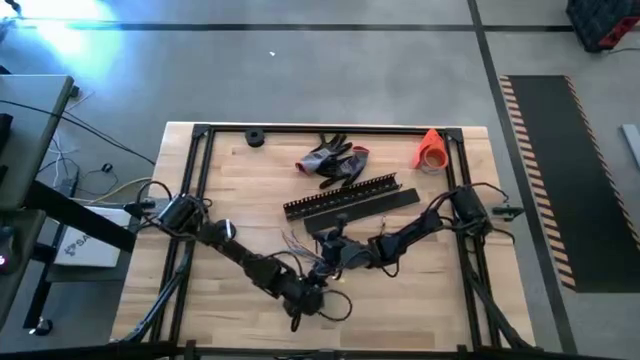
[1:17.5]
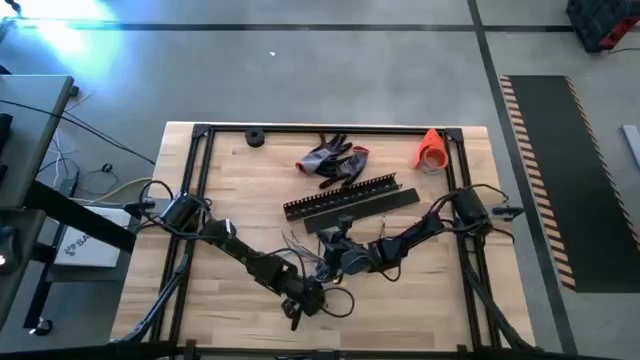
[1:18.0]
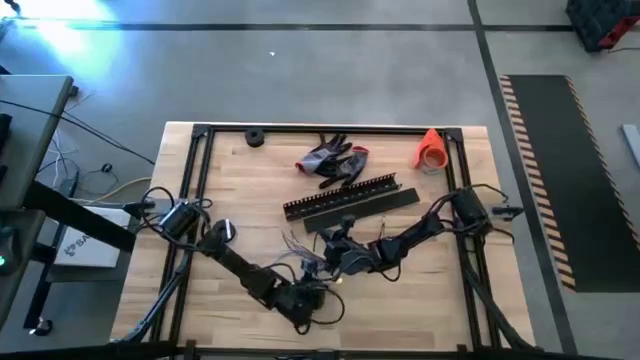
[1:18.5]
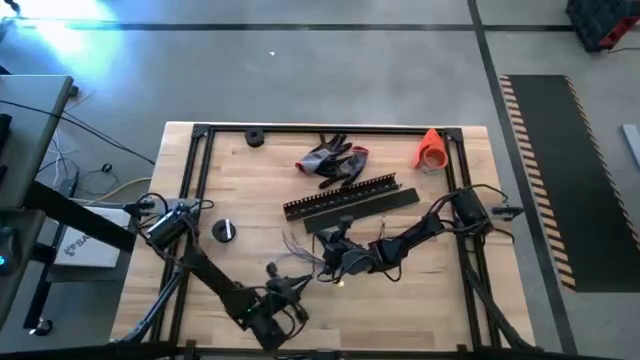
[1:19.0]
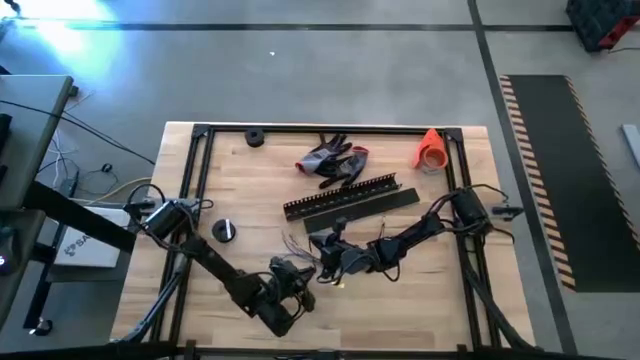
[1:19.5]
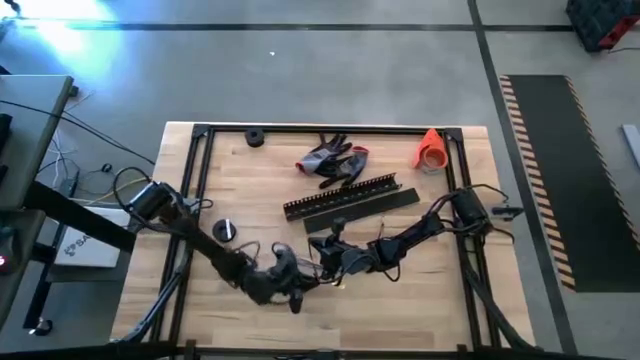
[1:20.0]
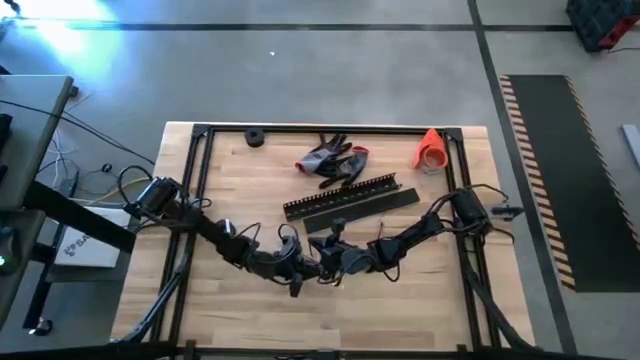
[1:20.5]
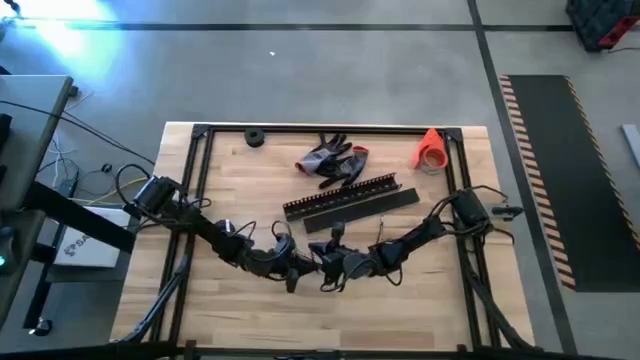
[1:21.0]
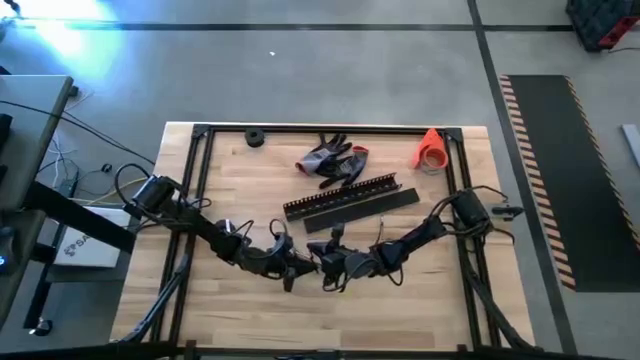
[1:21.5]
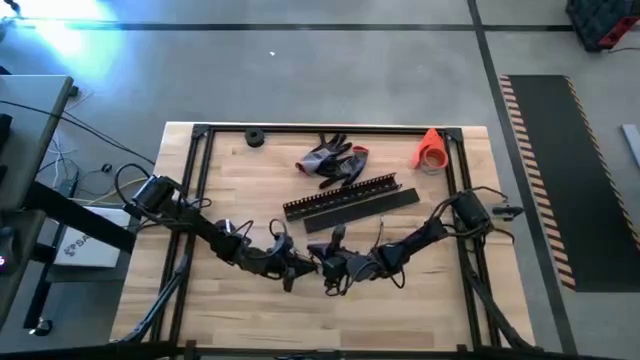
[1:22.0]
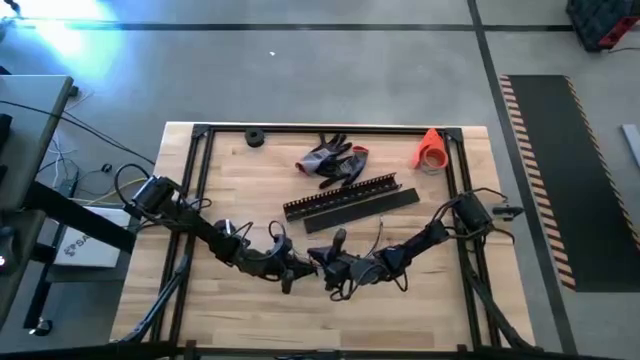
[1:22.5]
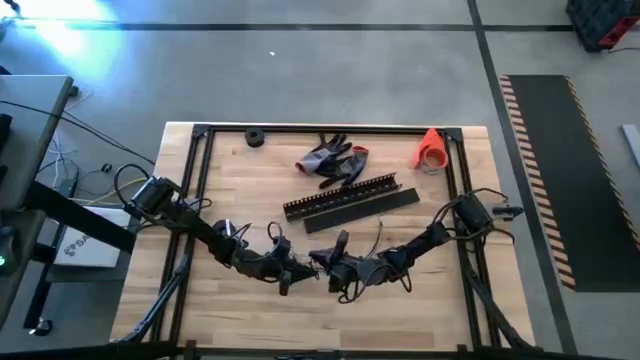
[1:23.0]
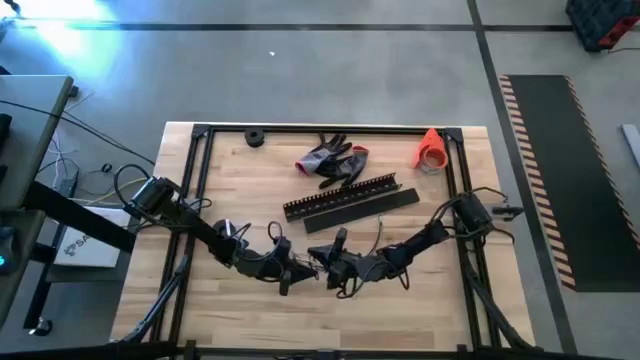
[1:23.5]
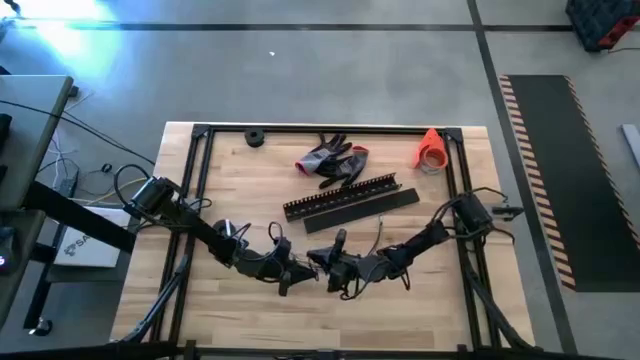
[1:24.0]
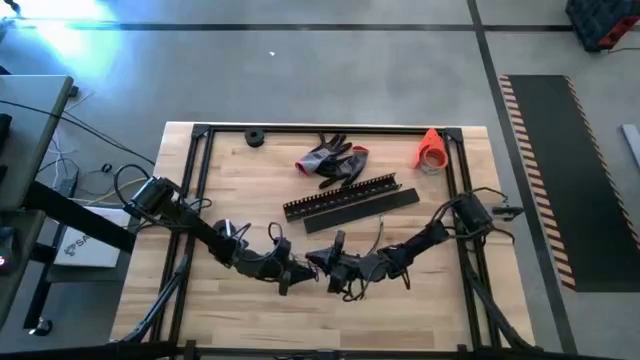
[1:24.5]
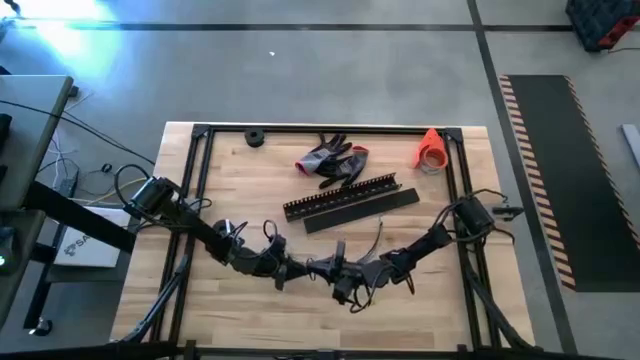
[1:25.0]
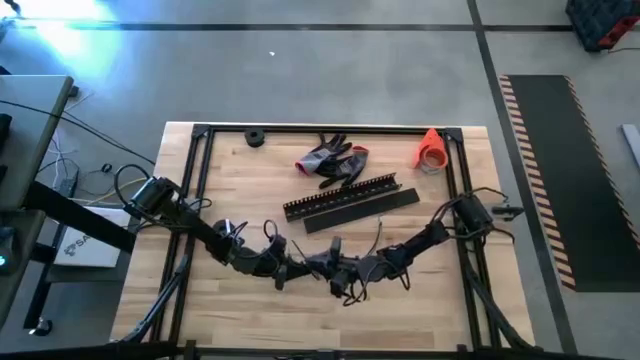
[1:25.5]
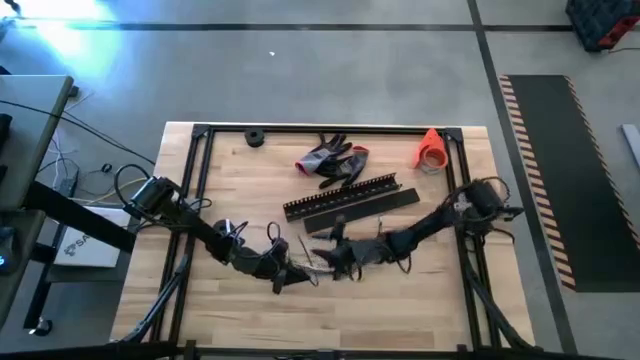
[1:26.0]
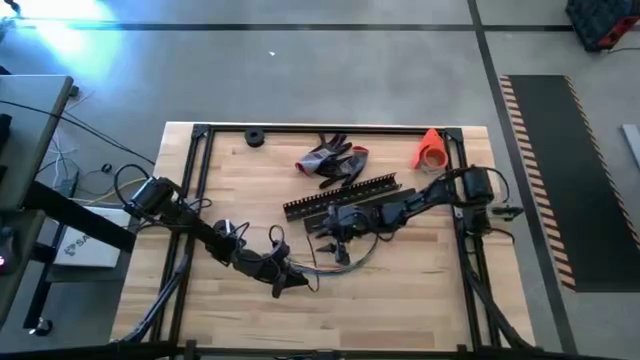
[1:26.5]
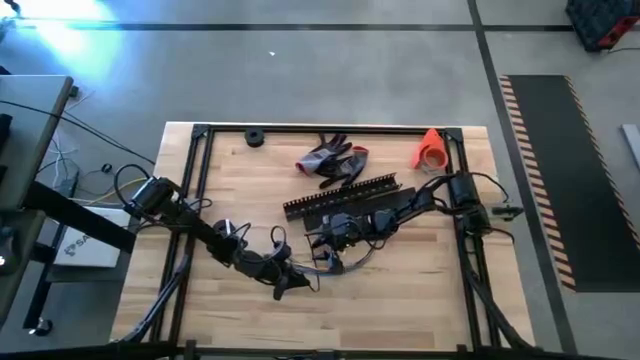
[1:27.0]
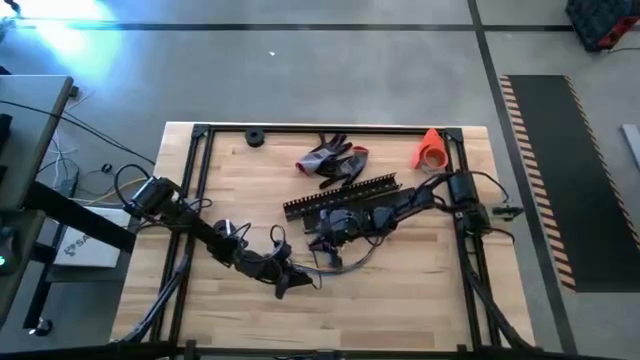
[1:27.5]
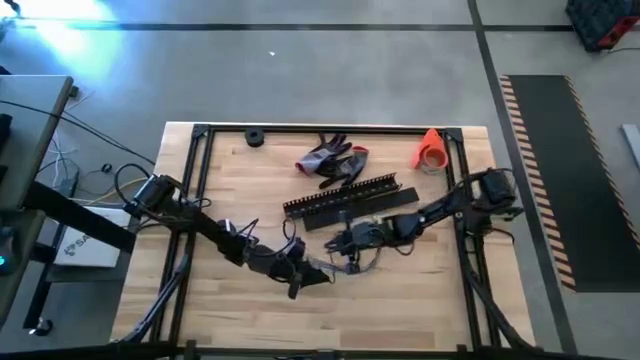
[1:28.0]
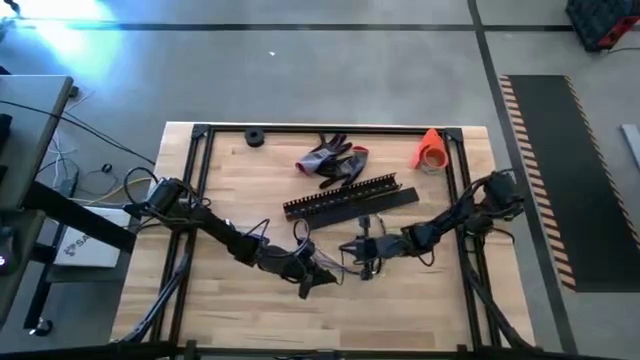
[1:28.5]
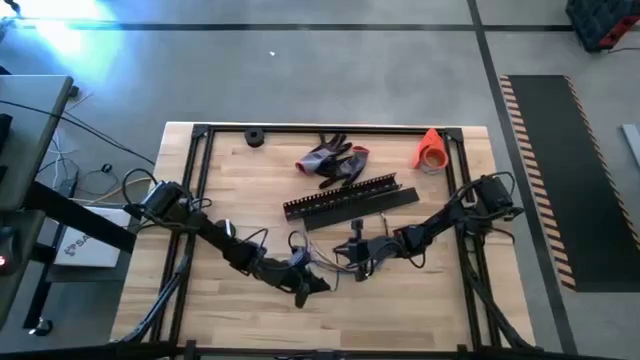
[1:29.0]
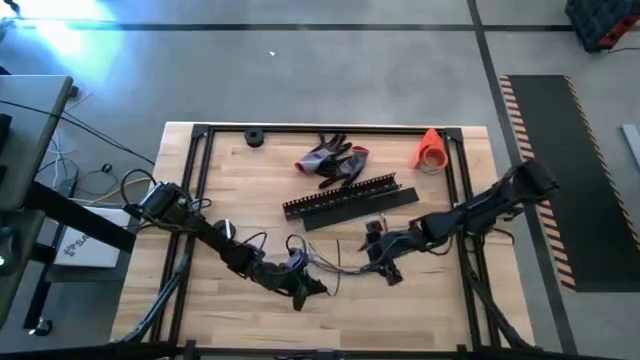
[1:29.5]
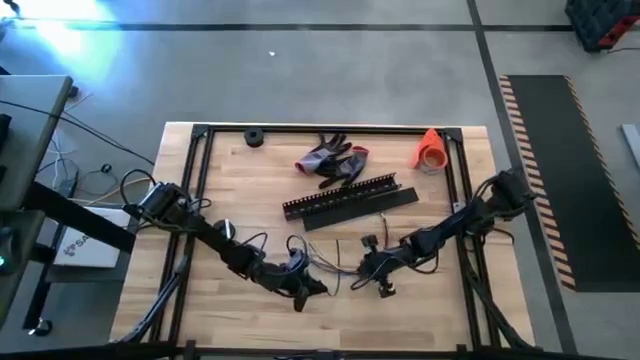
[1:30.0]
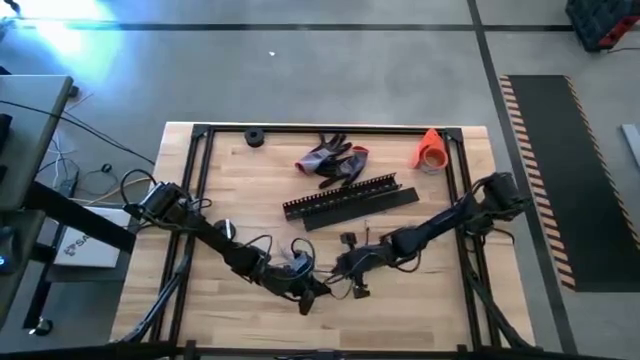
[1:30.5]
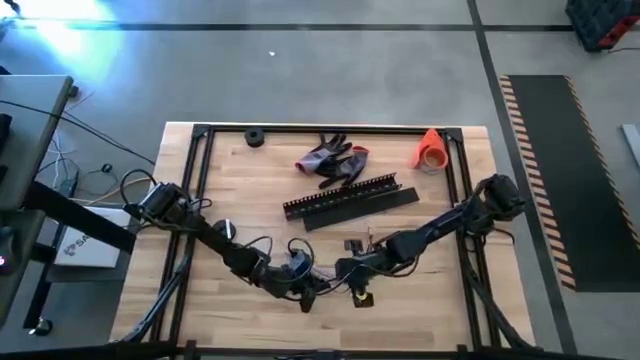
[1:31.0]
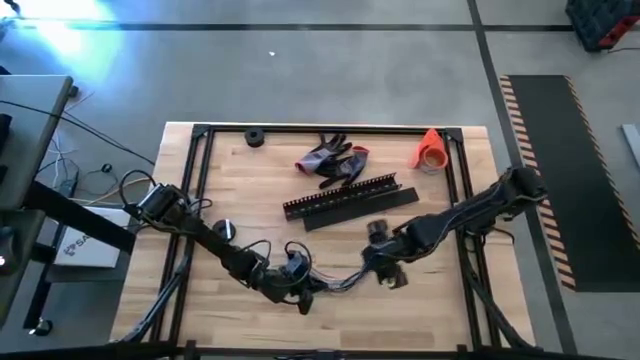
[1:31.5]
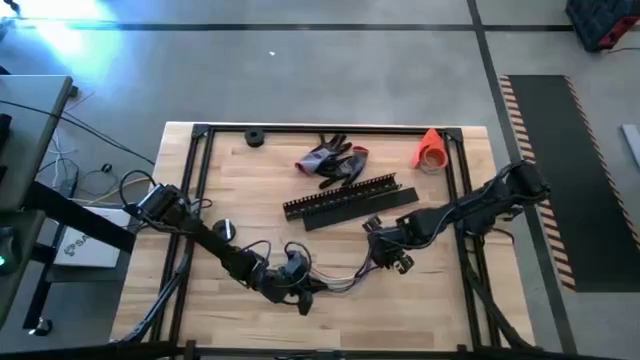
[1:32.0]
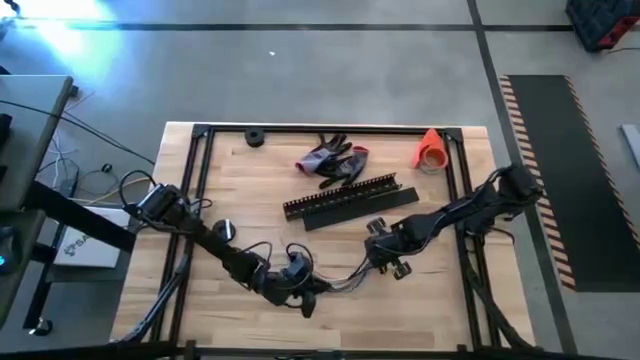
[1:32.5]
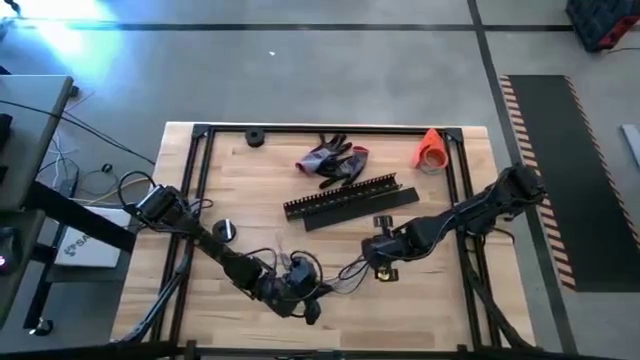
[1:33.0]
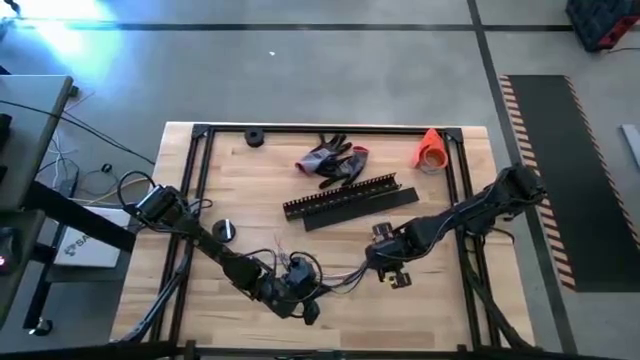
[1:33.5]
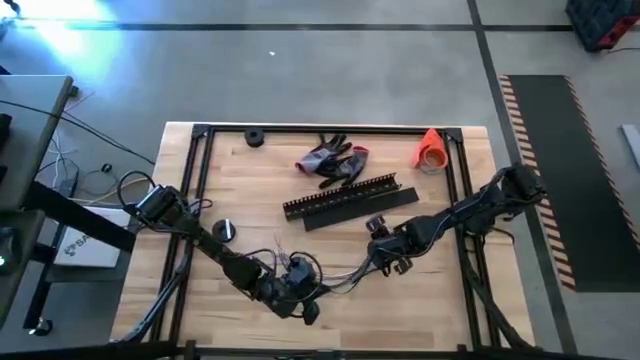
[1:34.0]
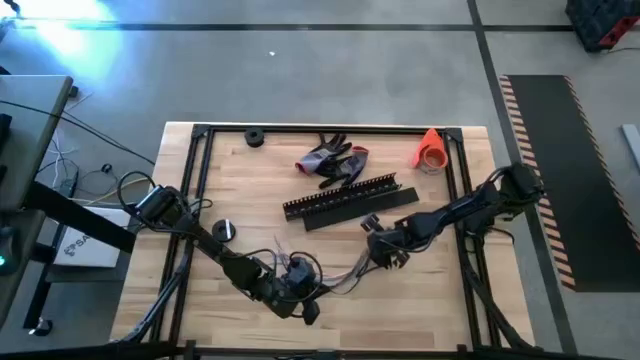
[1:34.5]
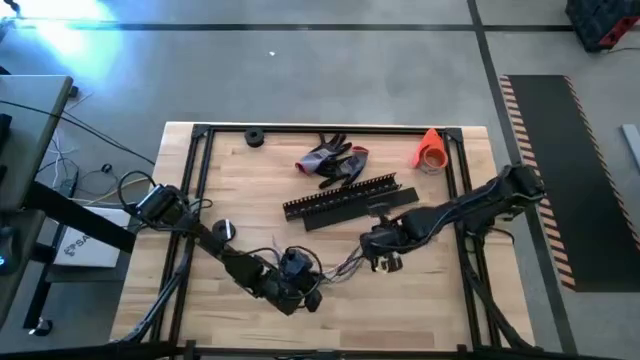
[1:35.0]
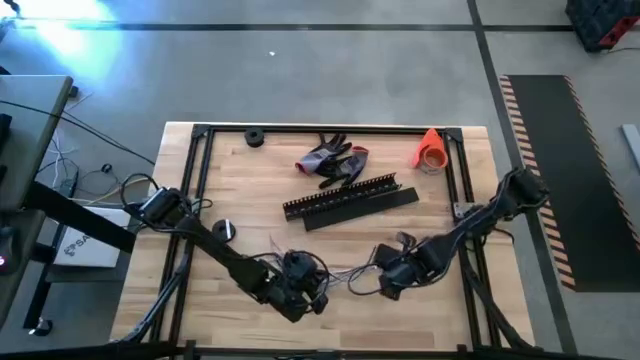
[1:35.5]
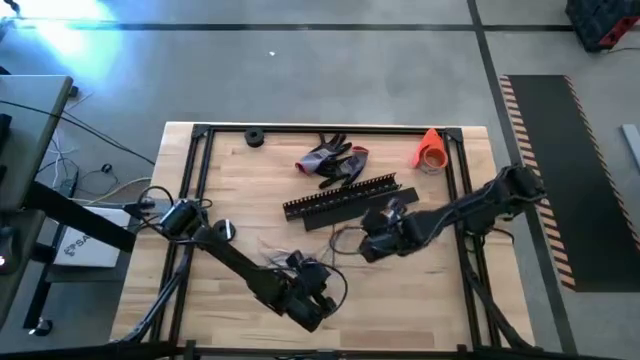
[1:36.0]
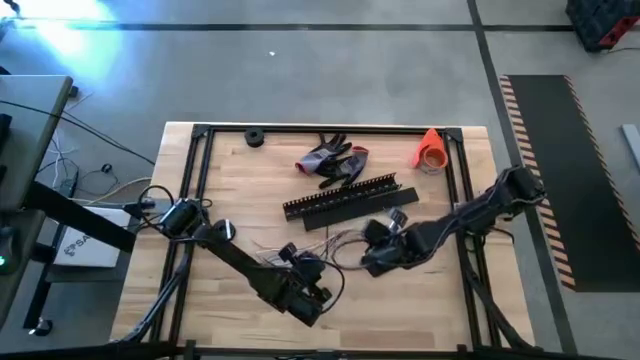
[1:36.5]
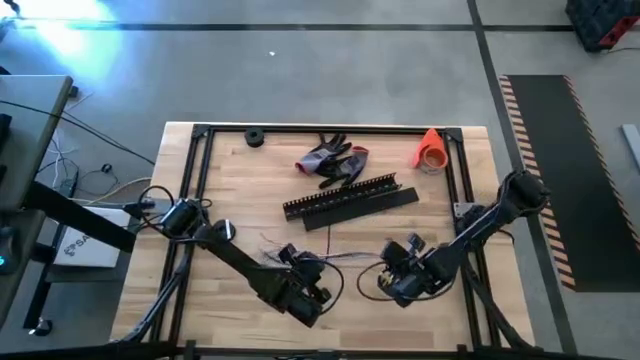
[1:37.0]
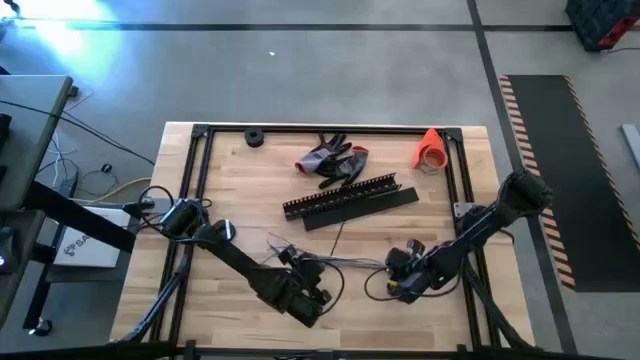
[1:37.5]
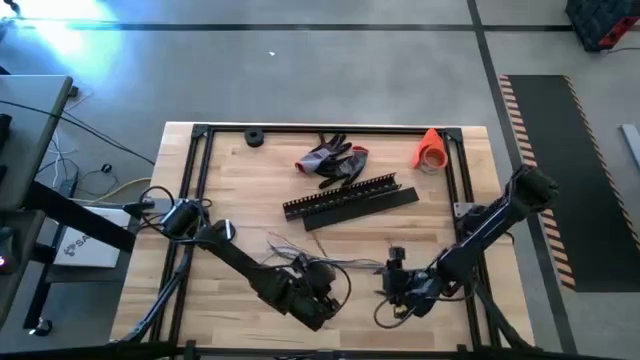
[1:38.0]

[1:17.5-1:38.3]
Task: Ziptie cables
Wrap the cables using a black zip tie
